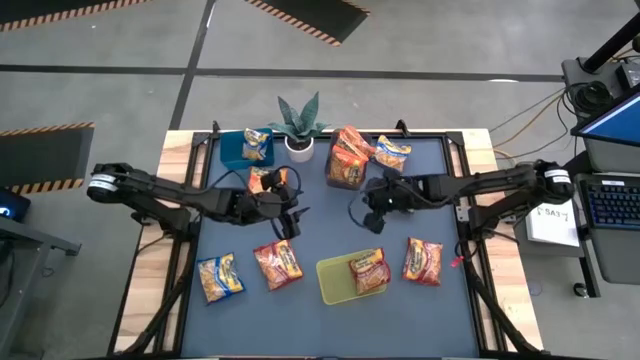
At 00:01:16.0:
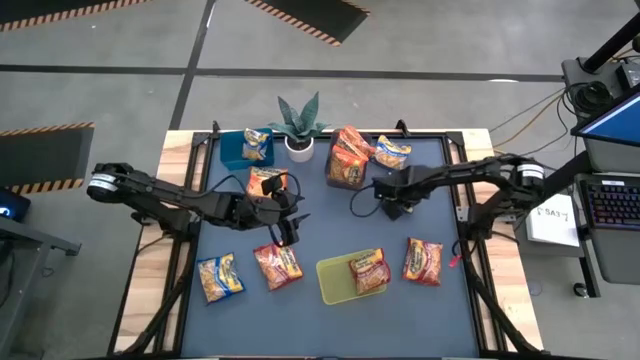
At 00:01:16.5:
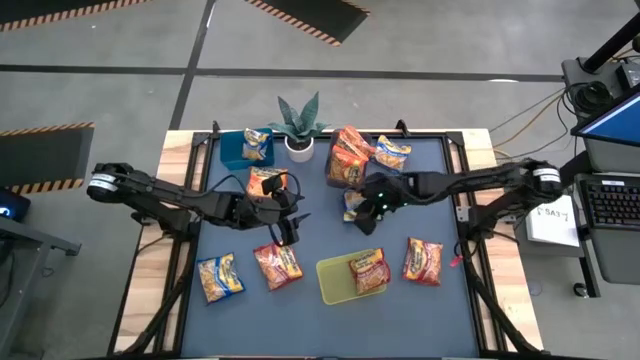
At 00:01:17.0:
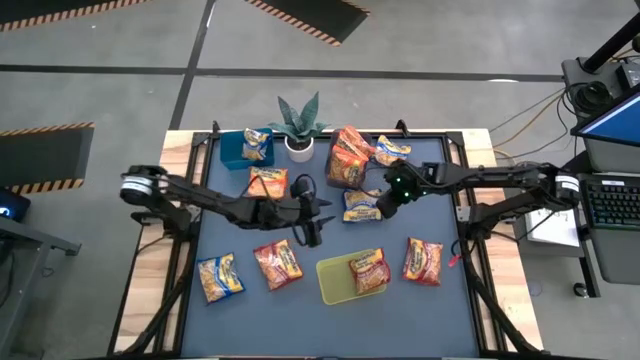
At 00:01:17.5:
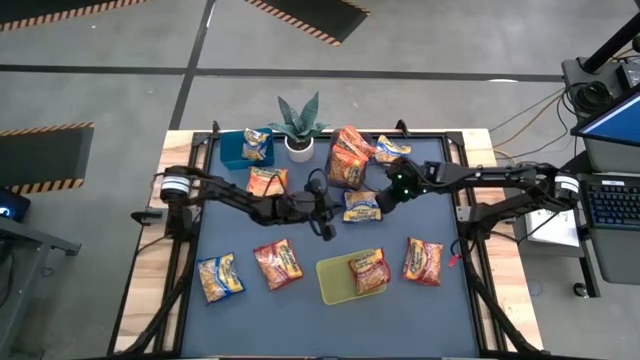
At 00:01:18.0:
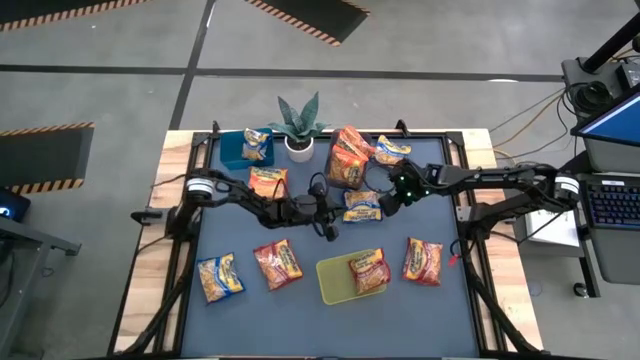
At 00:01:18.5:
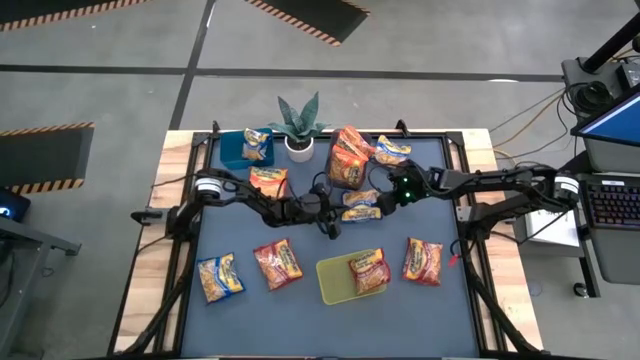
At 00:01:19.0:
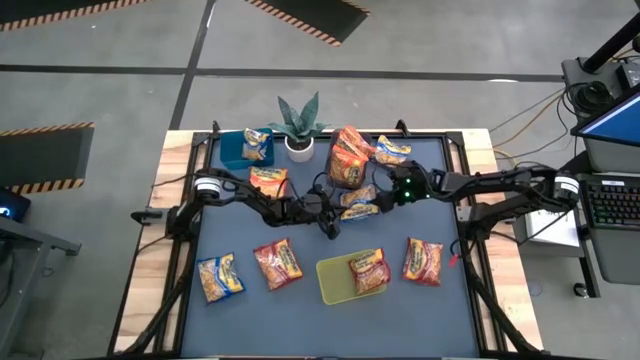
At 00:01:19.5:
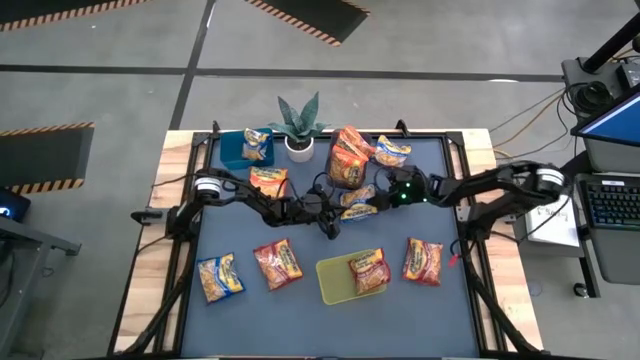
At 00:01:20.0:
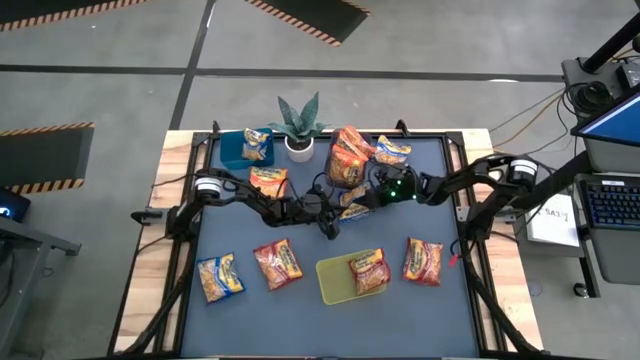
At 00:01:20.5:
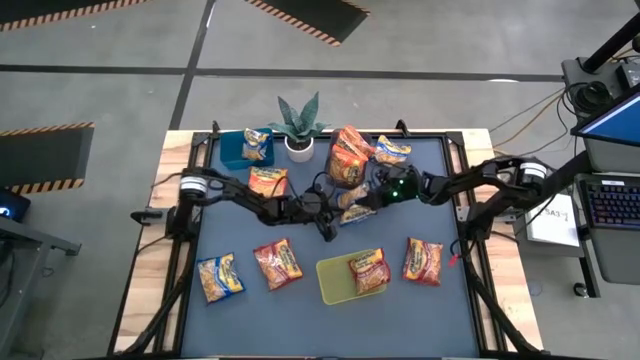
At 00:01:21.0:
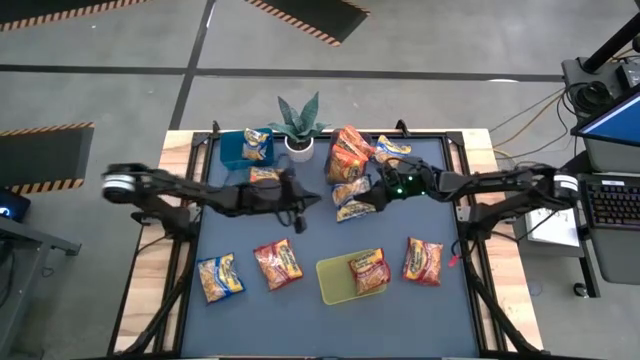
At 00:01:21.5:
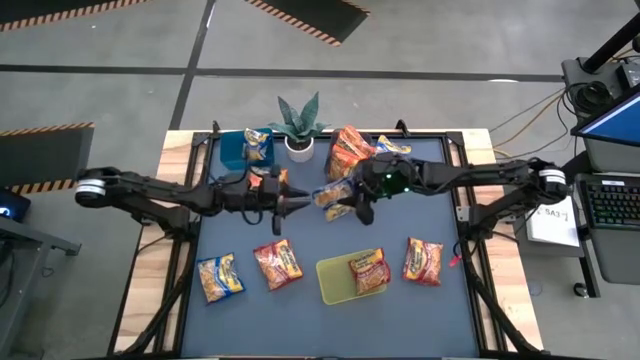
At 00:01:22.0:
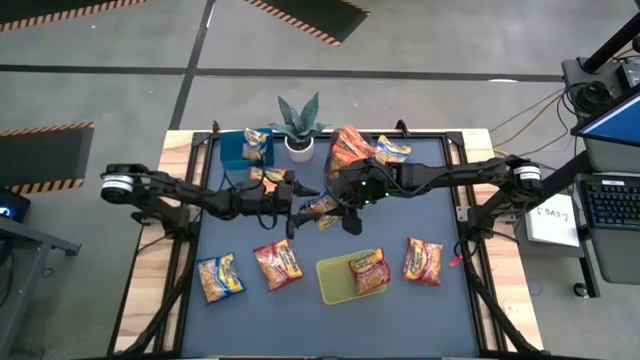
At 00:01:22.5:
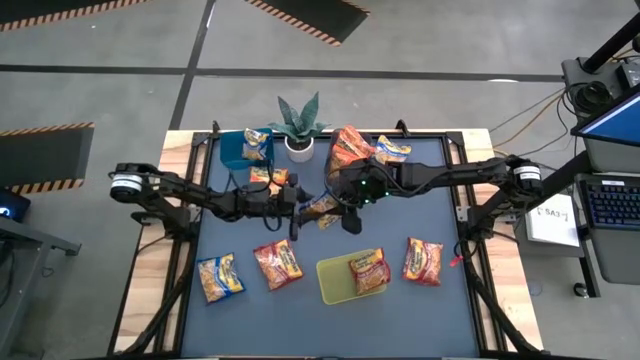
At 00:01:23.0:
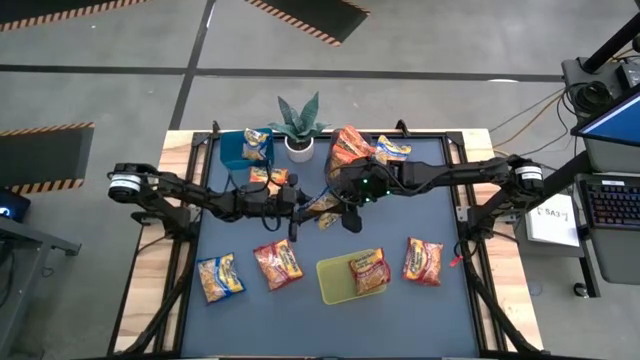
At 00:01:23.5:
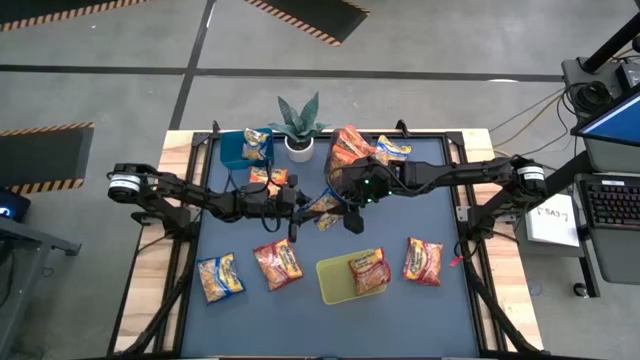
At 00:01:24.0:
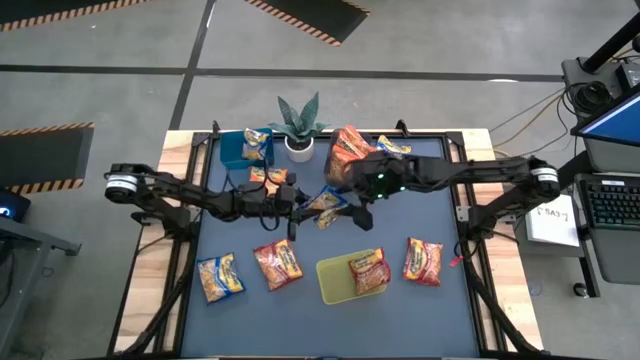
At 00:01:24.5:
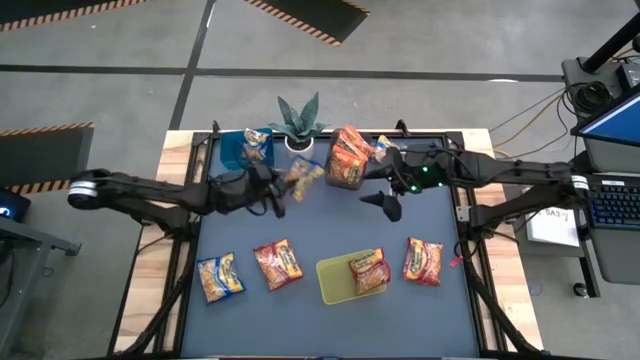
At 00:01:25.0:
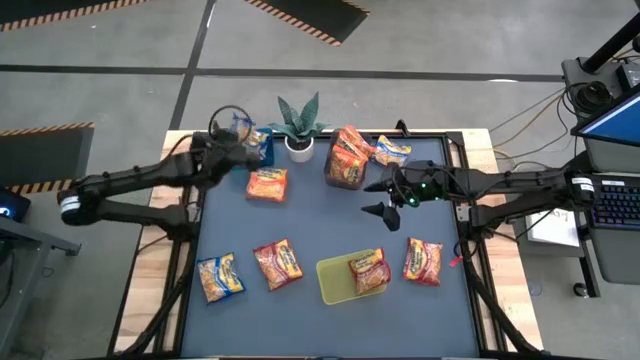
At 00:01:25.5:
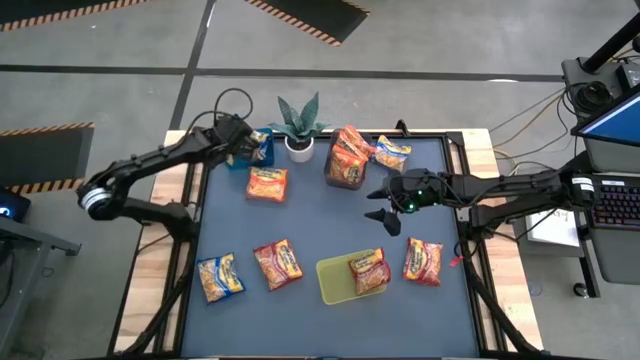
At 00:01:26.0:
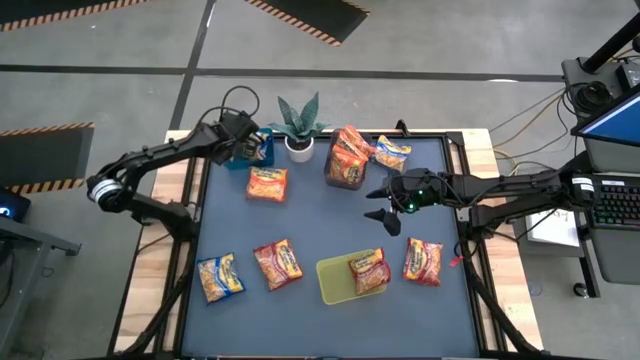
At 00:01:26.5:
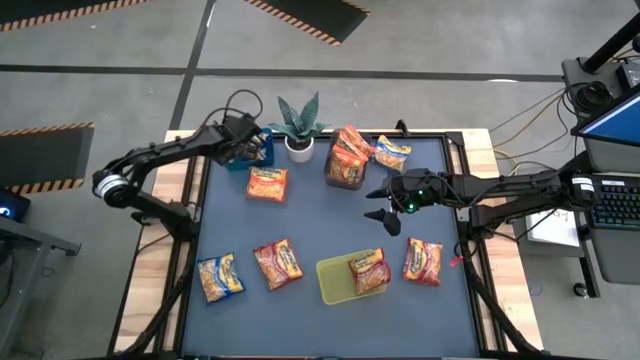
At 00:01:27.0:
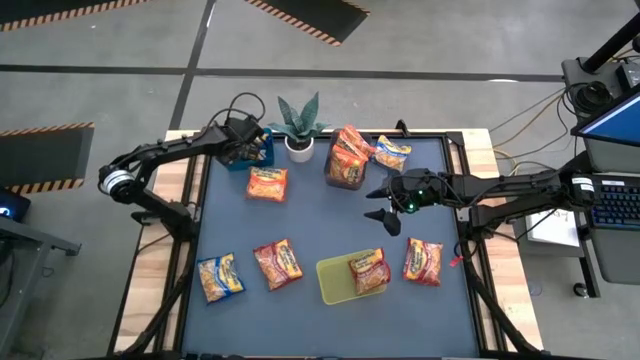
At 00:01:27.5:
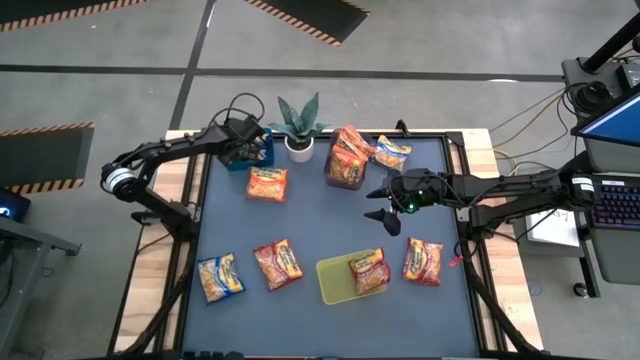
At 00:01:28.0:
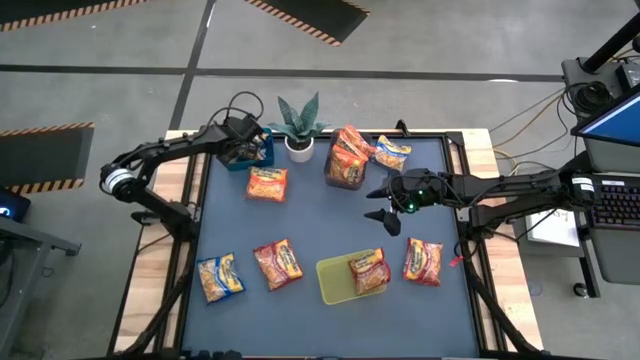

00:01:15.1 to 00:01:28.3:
Task: Sort Maruchan noodles
Put the blue bag into the blue bin

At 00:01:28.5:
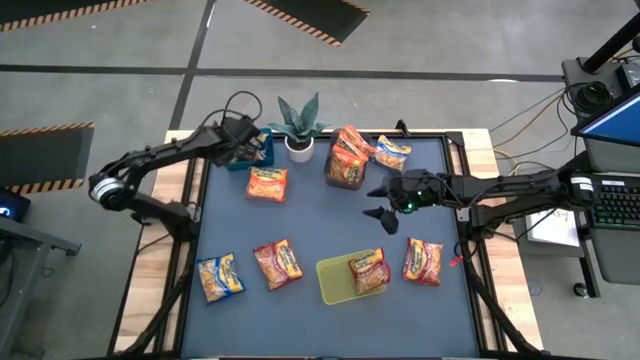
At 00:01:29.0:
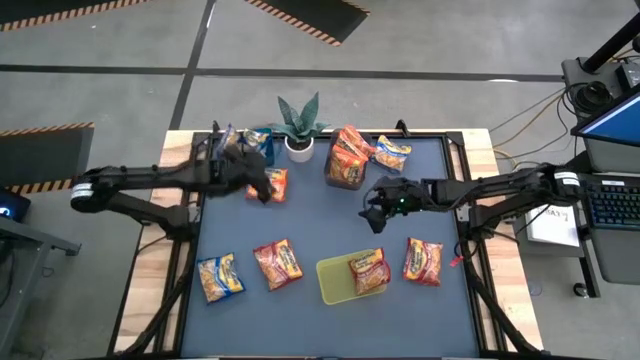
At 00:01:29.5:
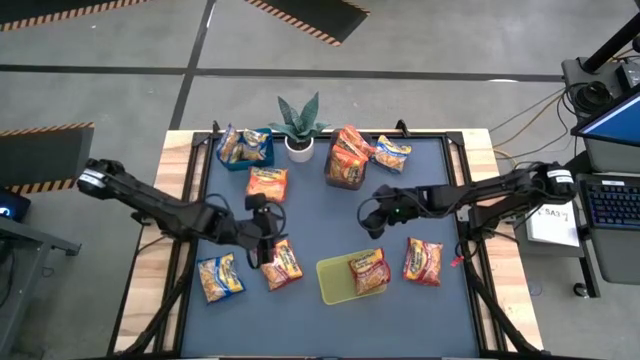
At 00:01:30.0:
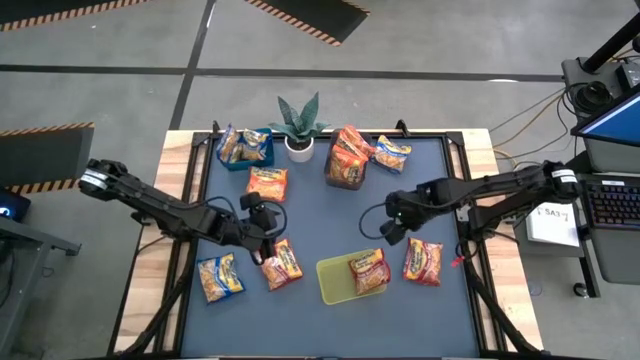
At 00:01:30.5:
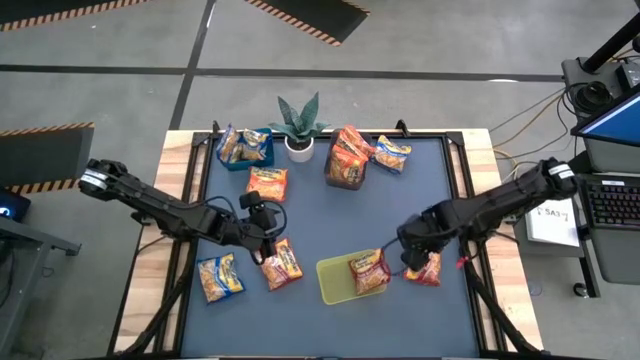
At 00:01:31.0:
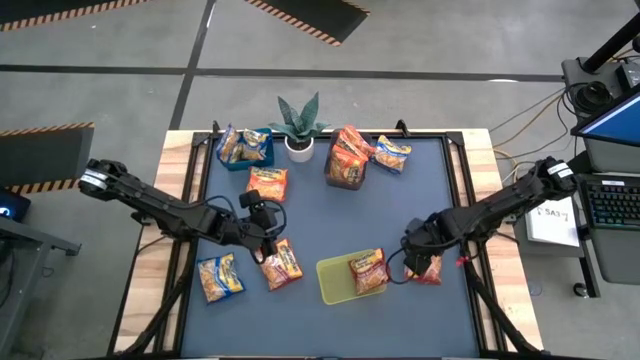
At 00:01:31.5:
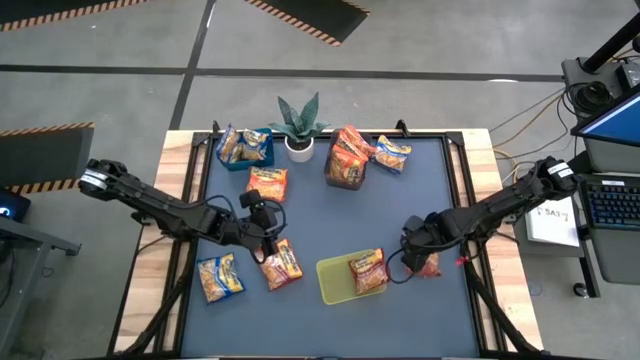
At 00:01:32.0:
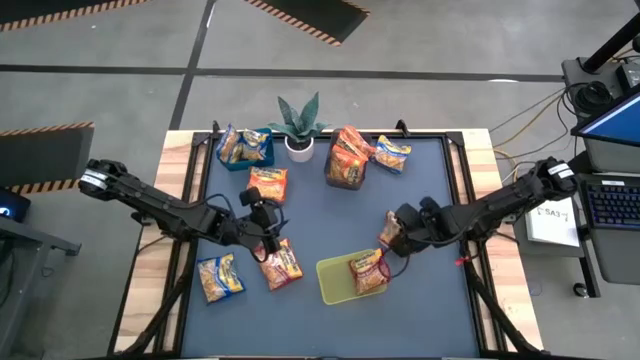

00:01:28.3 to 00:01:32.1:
Put the red bag into the yellow bin

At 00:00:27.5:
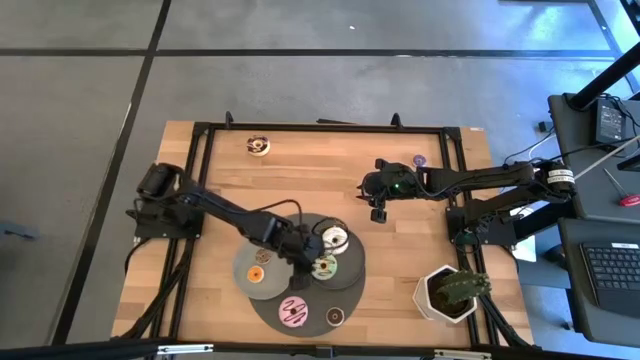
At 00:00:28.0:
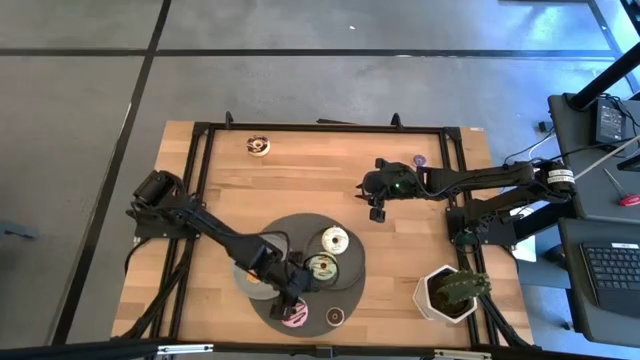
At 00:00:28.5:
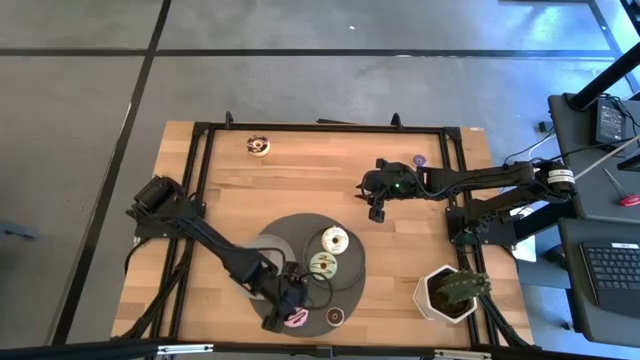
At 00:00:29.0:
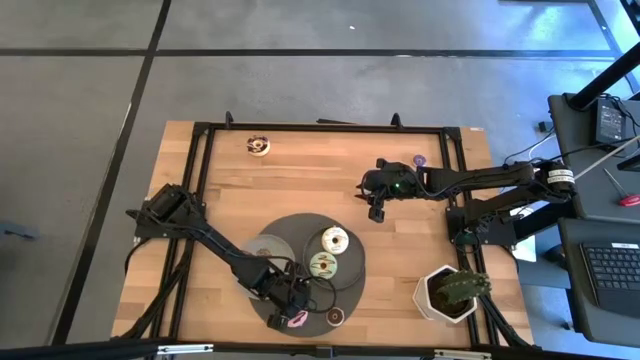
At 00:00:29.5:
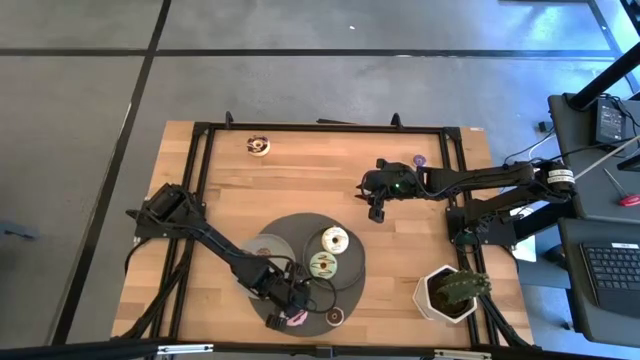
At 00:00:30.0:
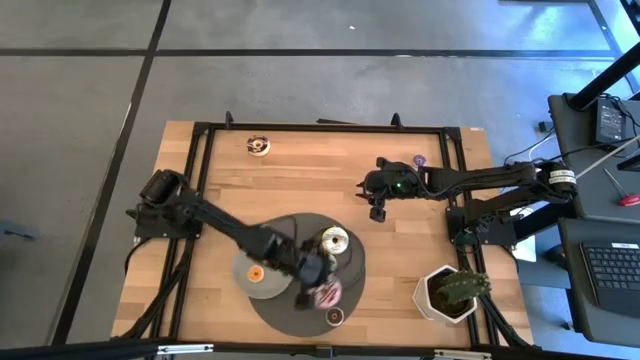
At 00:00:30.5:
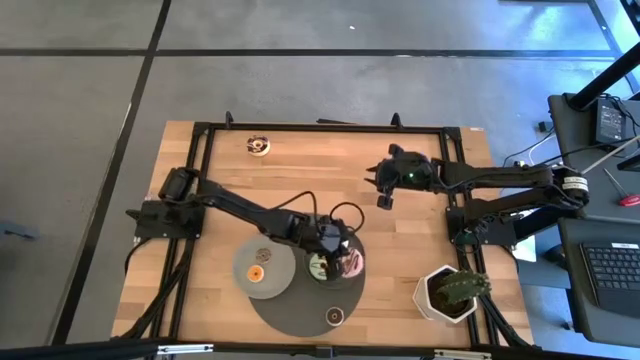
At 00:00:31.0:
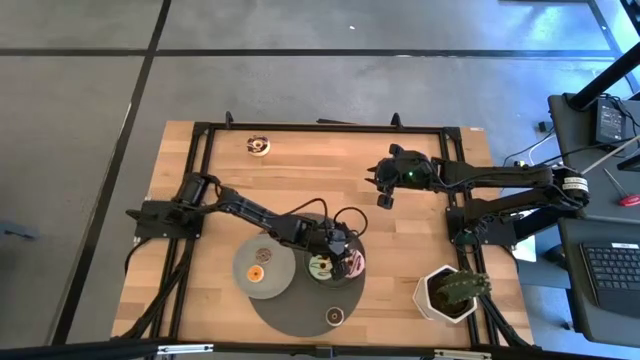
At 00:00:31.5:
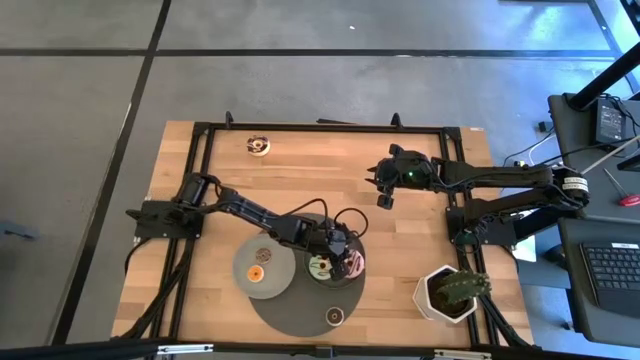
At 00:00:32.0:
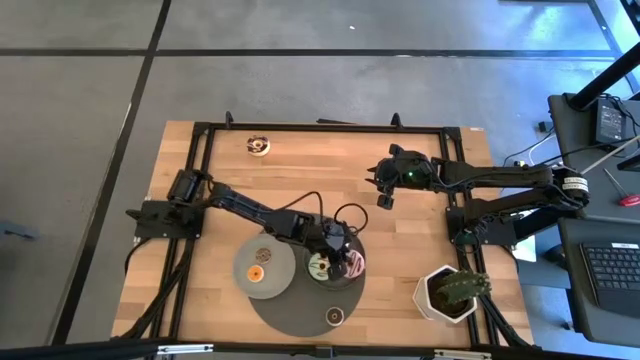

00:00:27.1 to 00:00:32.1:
Task: Pick & Place donuts
Put the big pink donut on the black plate
